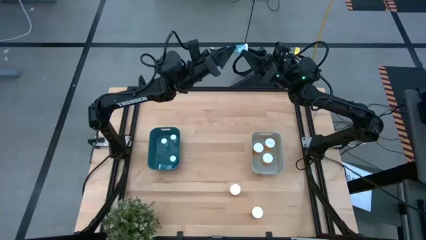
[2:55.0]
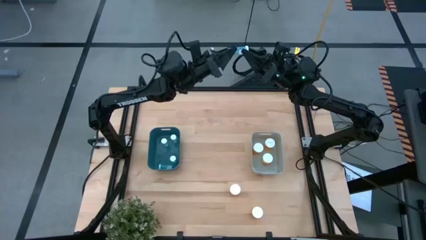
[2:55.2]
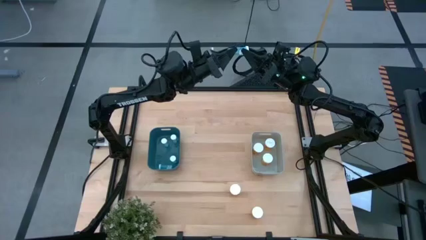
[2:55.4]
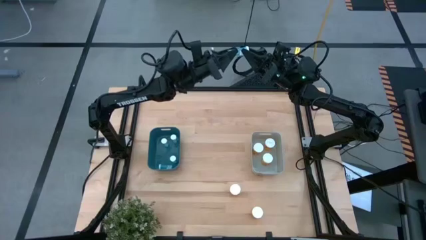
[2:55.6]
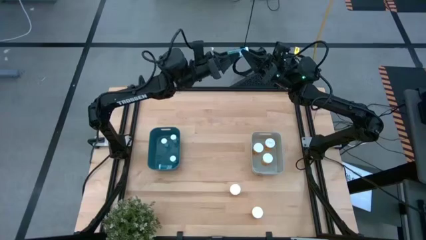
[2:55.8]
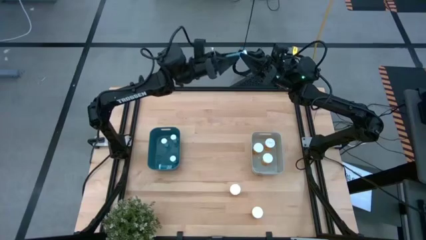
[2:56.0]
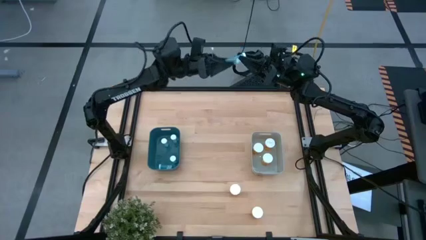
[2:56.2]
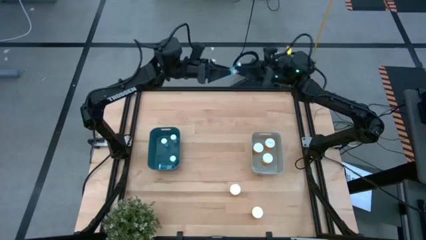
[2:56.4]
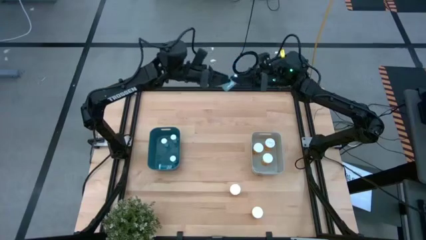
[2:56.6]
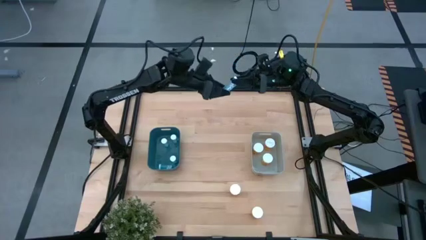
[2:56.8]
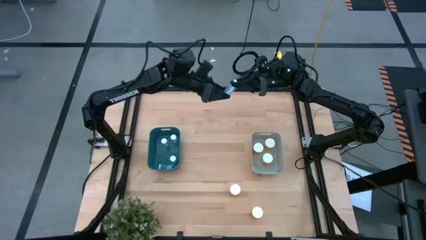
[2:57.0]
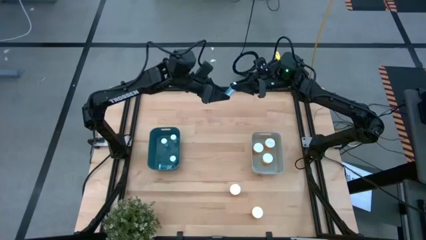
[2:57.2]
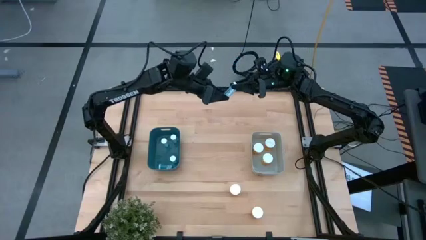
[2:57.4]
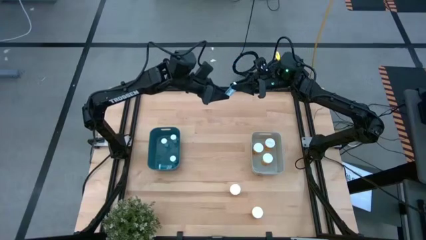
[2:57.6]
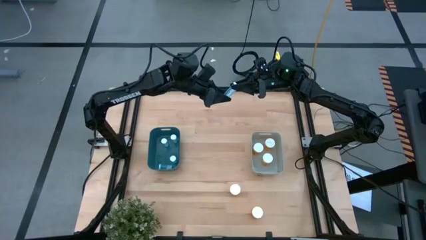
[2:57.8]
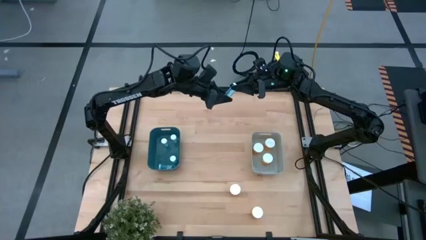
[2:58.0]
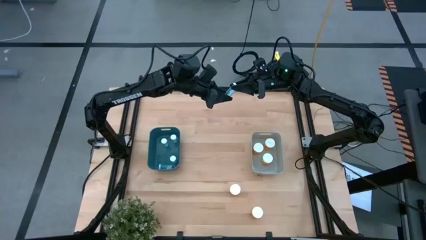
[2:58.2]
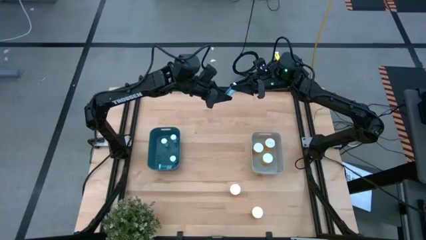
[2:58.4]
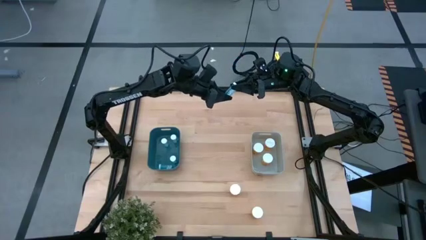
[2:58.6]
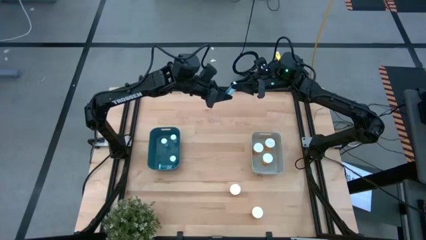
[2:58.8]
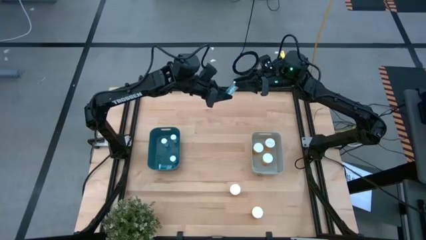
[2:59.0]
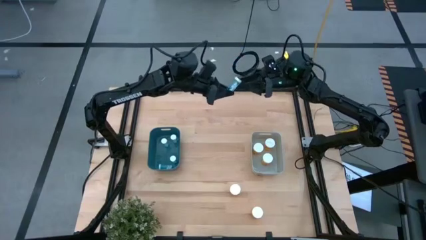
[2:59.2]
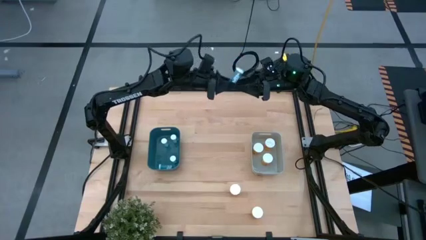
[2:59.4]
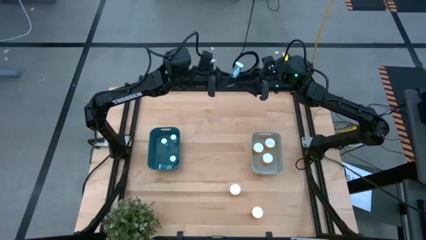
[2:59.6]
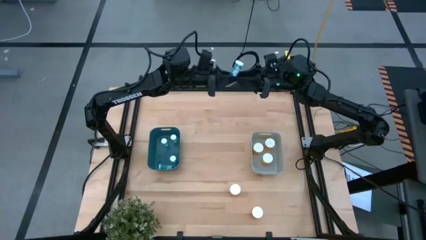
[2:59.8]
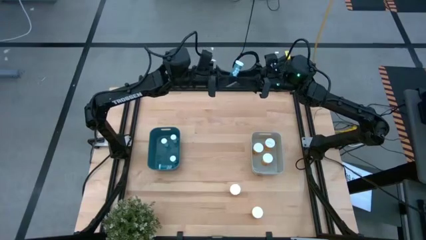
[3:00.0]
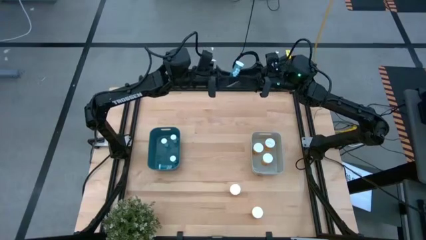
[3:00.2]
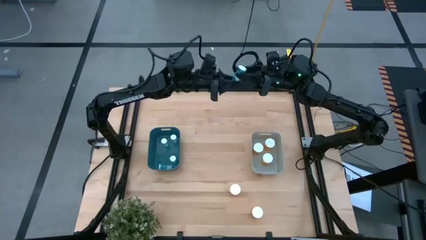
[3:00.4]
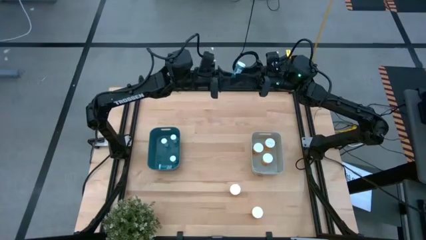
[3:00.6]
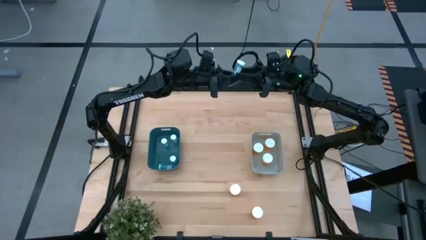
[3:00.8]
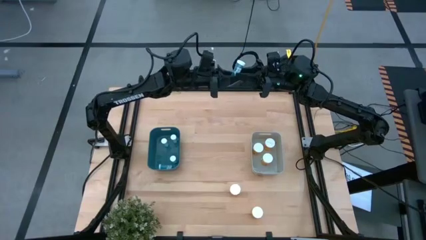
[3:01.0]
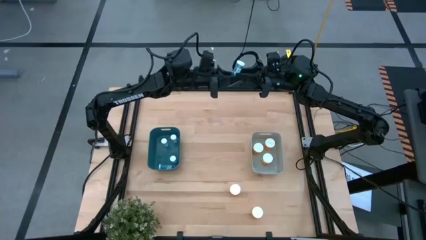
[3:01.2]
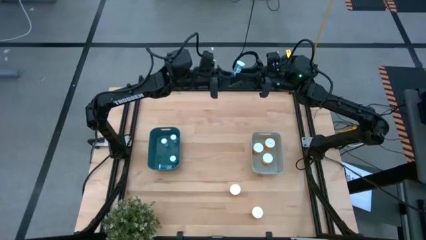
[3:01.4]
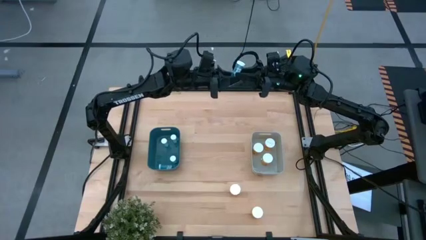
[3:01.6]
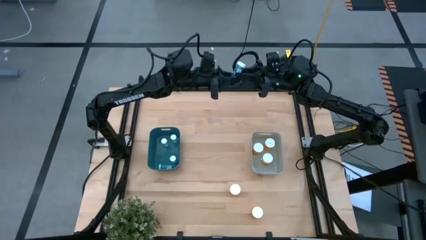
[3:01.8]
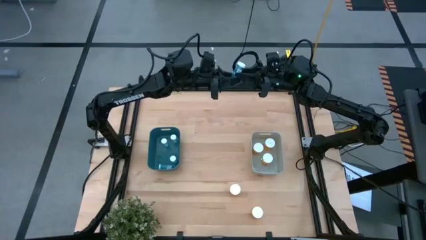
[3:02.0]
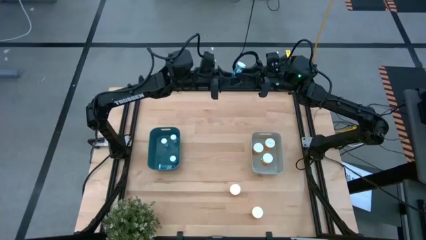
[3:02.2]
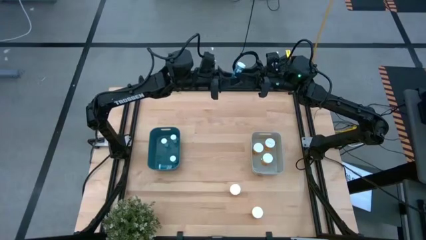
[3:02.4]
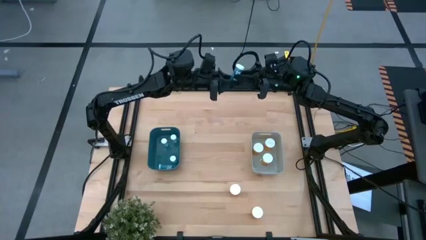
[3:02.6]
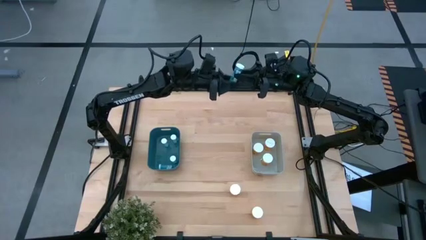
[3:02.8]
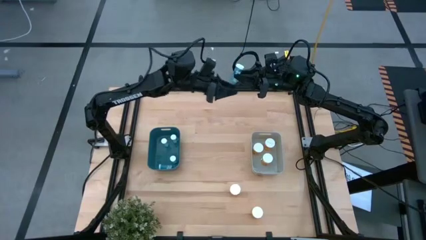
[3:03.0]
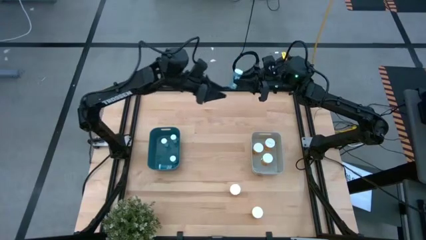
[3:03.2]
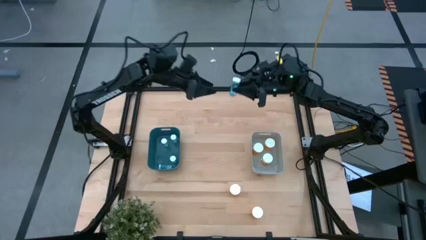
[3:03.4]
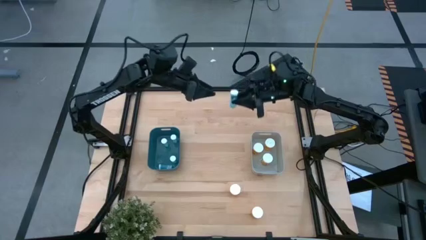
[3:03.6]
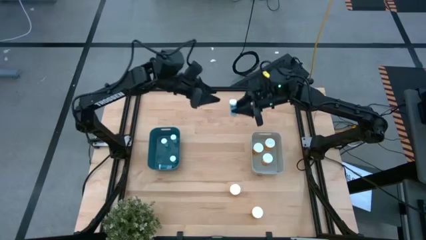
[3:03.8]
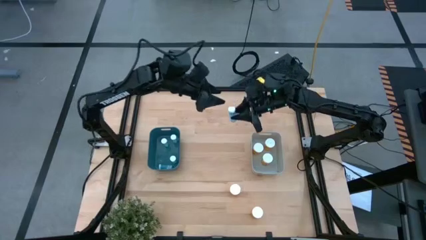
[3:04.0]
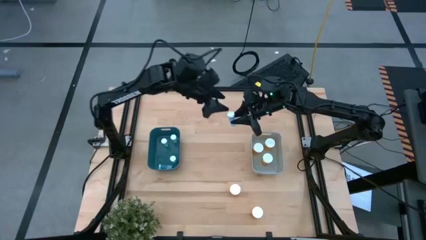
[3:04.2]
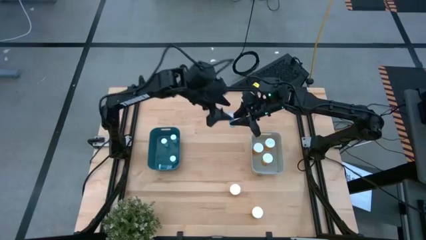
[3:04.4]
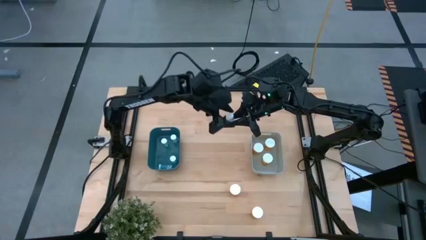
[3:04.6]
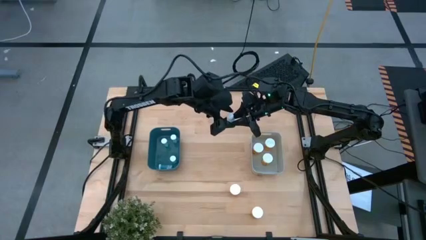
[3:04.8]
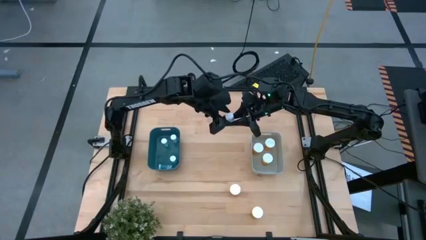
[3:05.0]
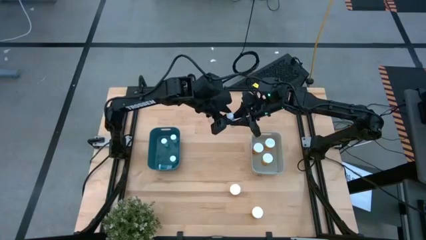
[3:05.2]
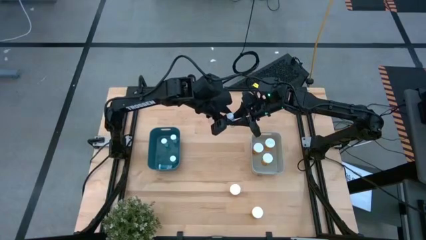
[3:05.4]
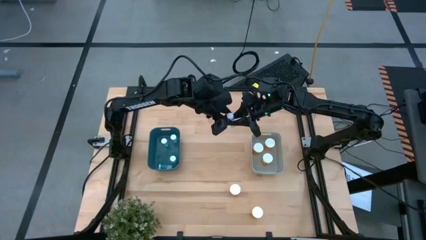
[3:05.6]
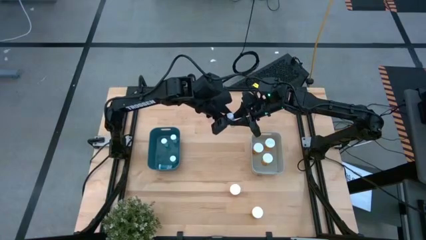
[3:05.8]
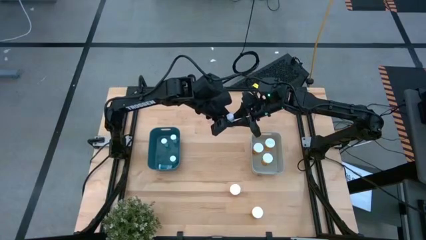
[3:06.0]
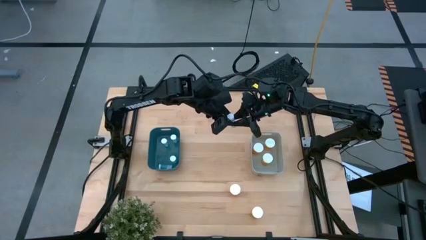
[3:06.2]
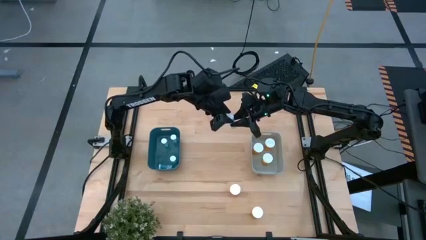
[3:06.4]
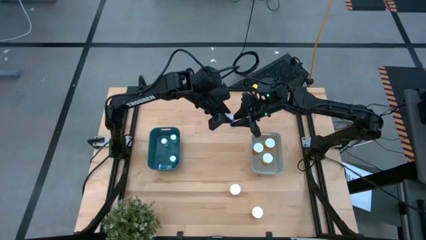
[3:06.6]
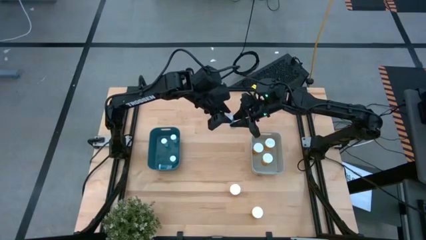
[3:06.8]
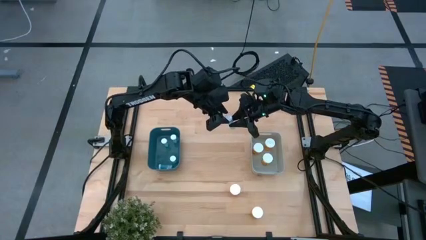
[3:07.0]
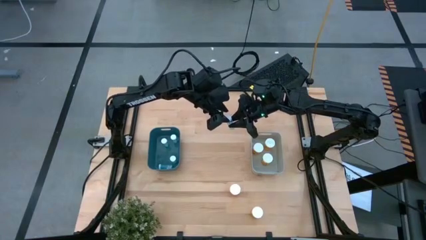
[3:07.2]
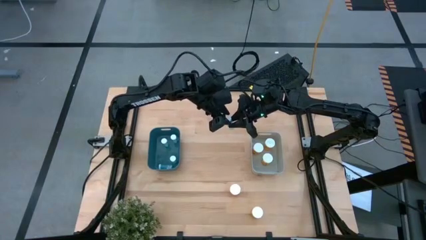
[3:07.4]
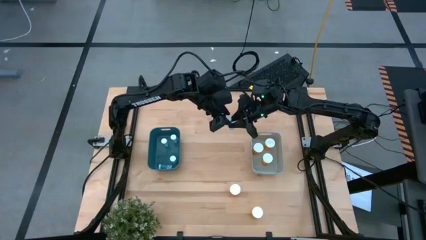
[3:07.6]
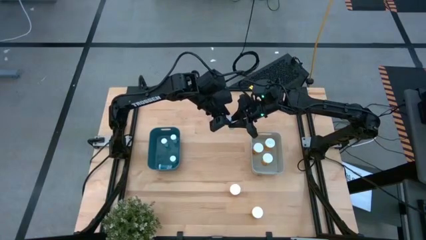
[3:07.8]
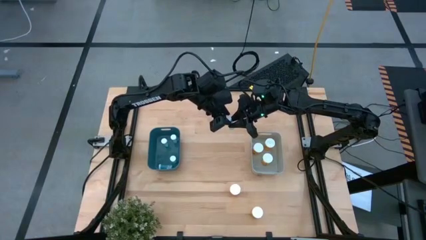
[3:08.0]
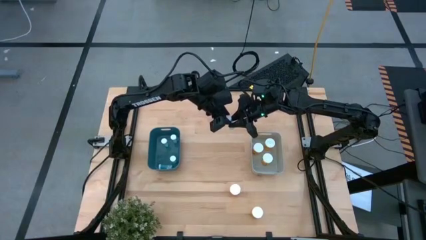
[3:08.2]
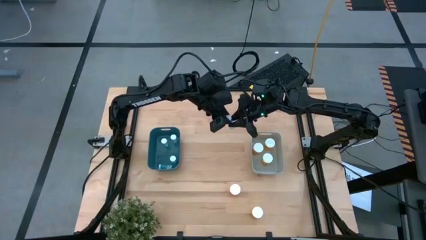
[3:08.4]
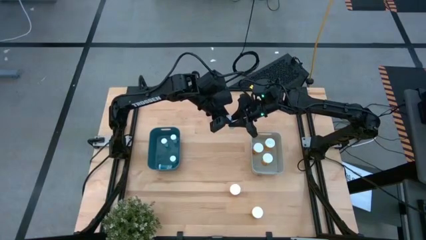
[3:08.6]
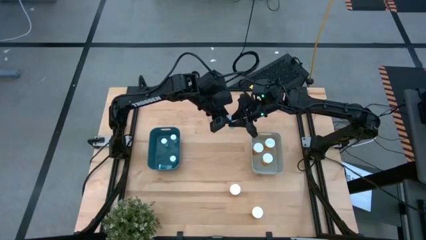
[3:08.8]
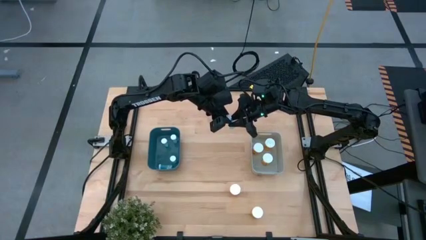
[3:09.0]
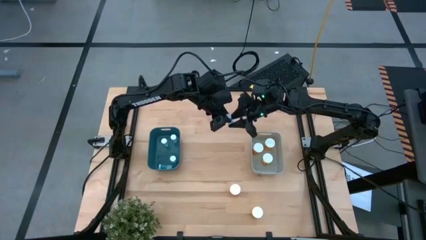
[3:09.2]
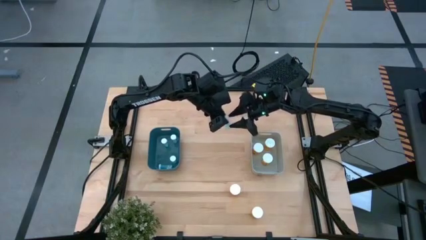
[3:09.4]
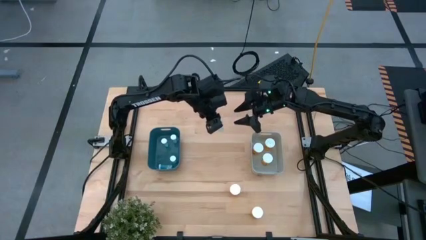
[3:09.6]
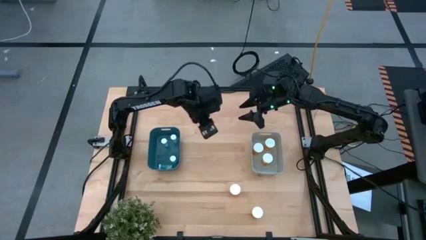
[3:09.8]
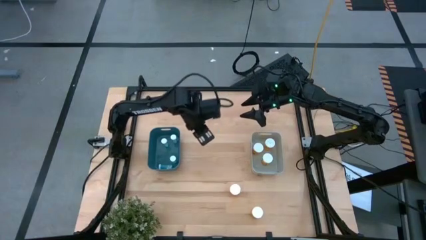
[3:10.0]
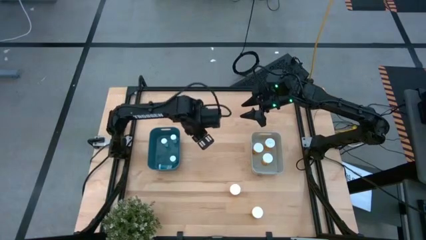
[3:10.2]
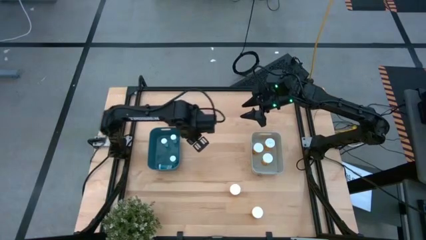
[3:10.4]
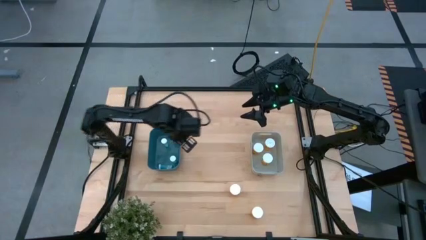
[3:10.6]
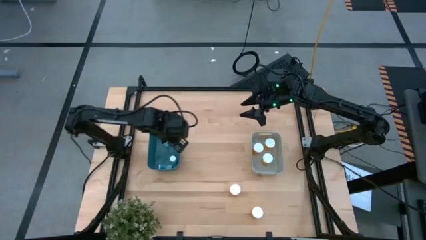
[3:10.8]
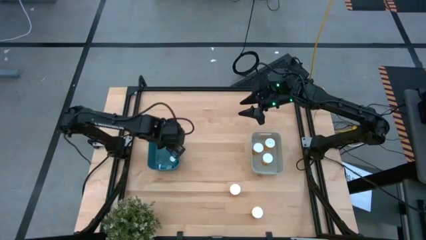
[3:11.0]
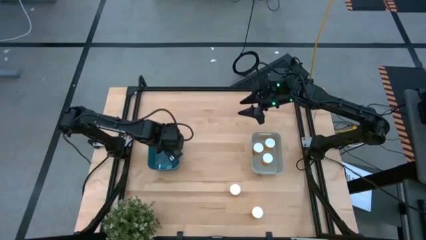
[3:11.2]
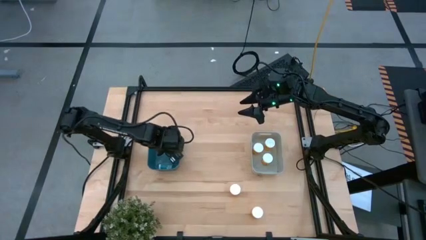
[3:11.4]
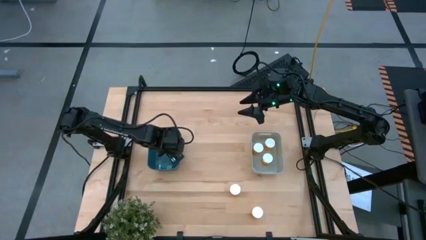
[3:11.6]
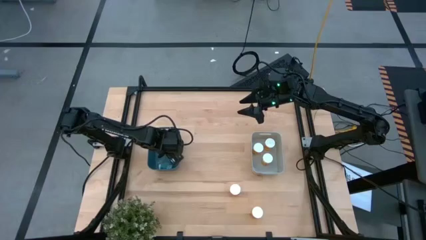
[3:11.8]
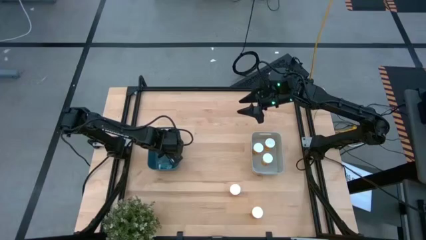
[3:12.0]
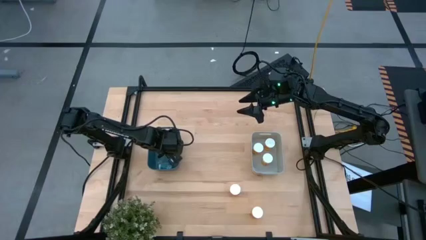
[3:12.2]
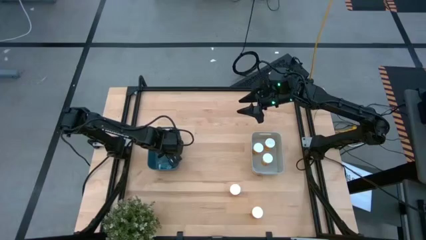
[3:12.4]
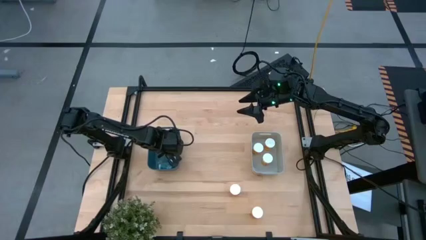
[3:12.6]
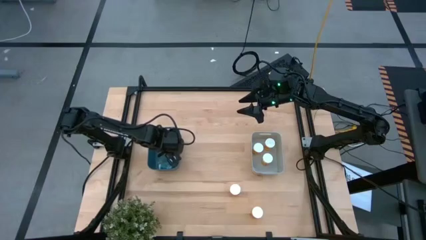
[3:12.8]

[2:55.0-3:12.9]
Task: Pick and place medicine bottles into bin by pill shape (circle, oval)
Adjust the blue pill bottle
